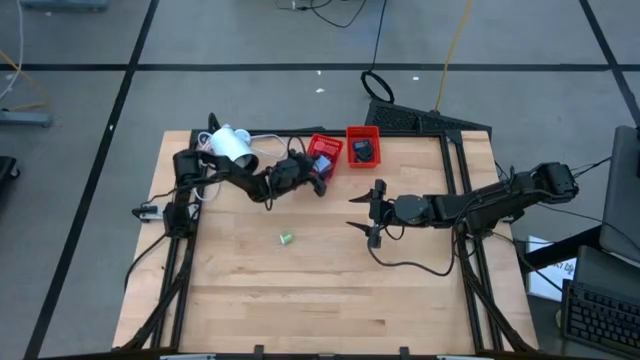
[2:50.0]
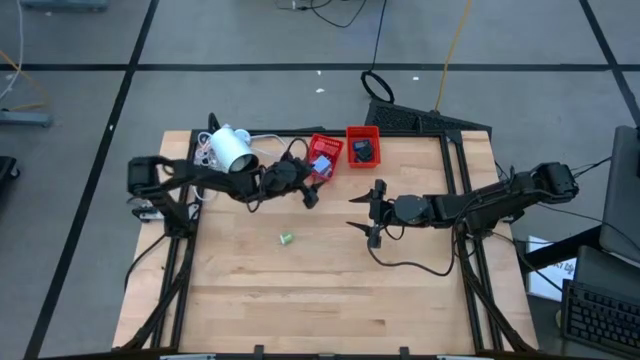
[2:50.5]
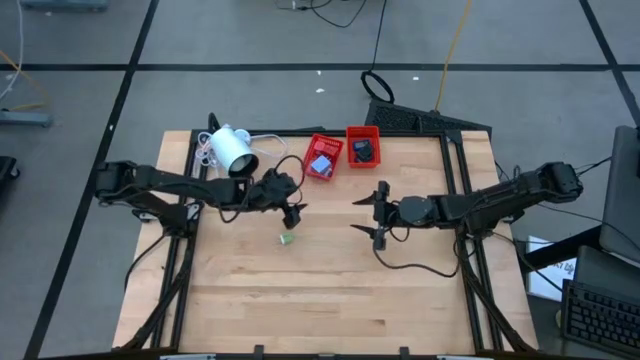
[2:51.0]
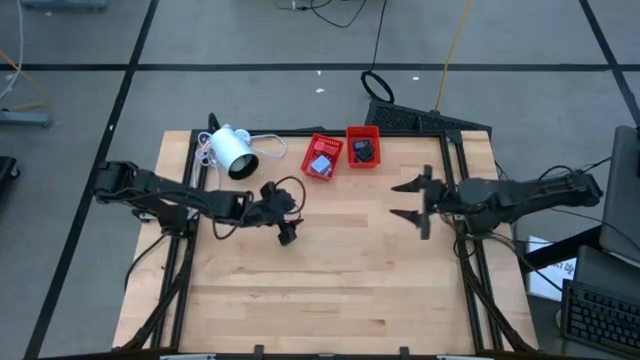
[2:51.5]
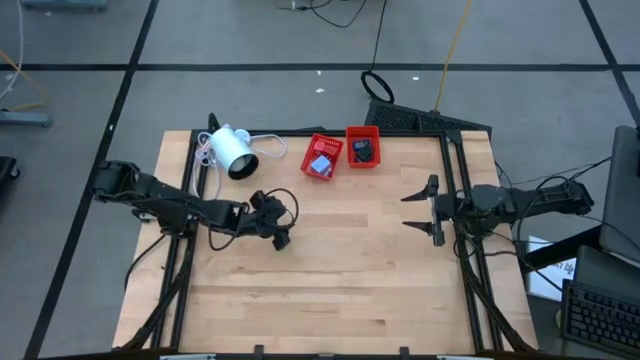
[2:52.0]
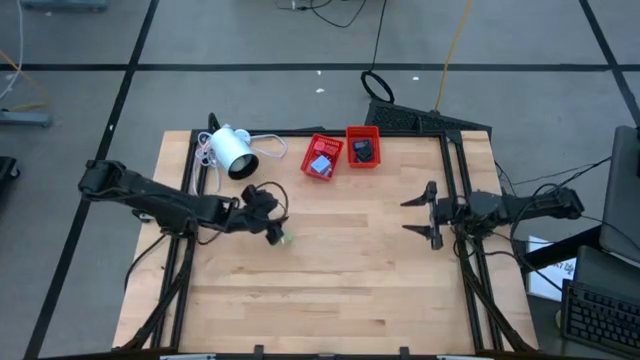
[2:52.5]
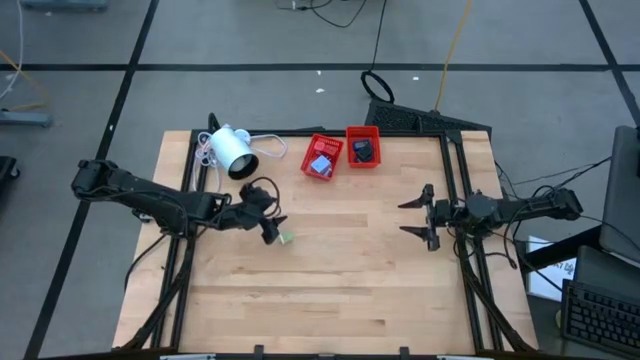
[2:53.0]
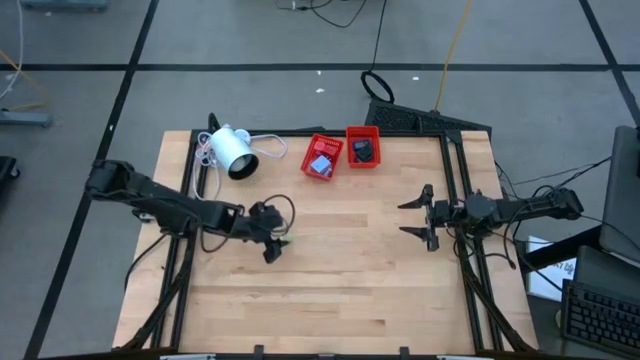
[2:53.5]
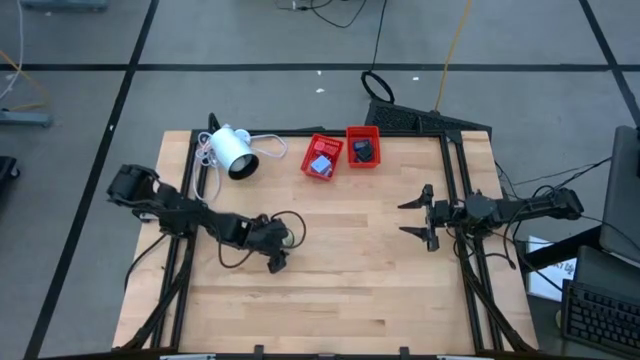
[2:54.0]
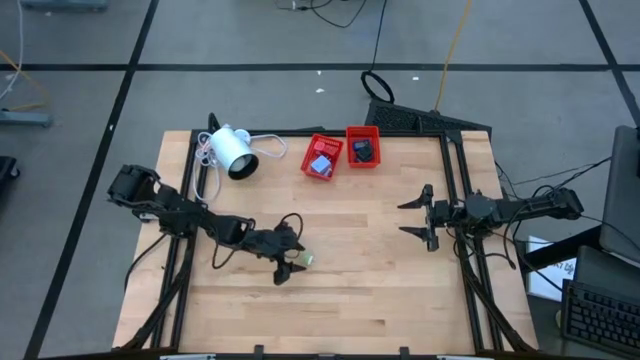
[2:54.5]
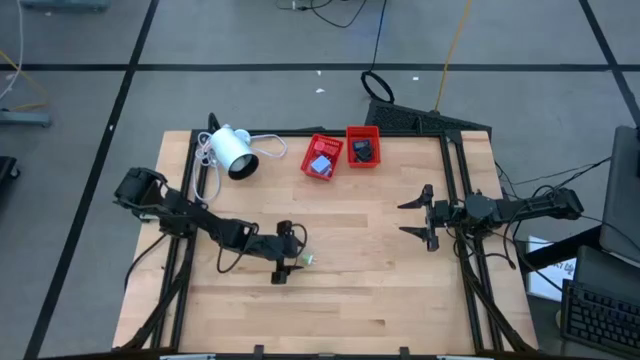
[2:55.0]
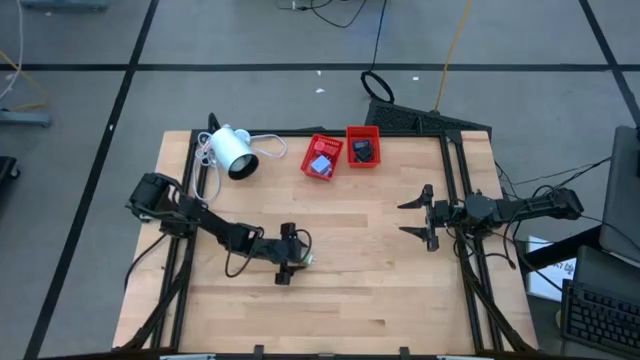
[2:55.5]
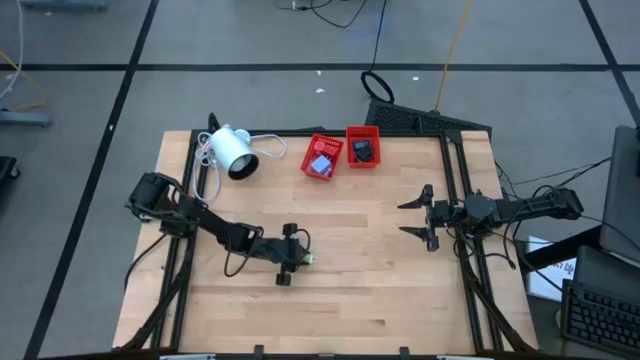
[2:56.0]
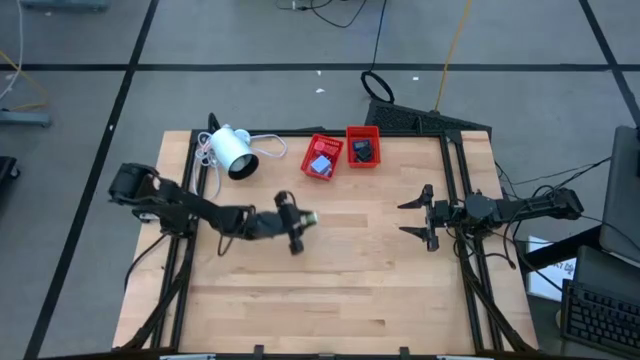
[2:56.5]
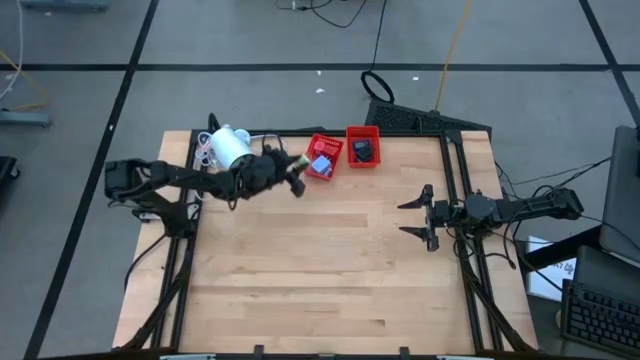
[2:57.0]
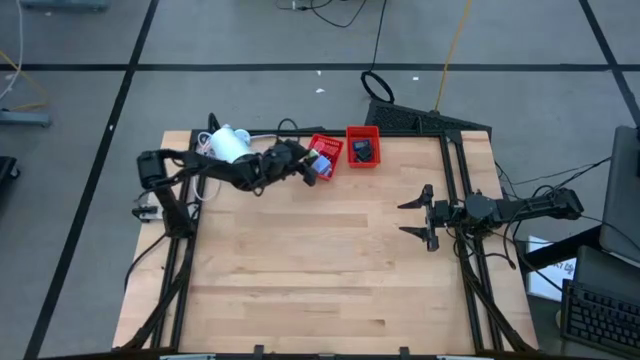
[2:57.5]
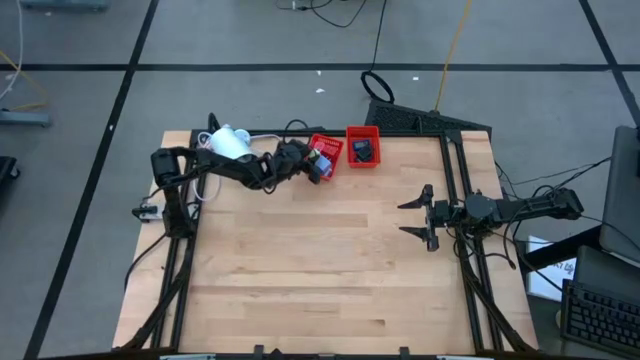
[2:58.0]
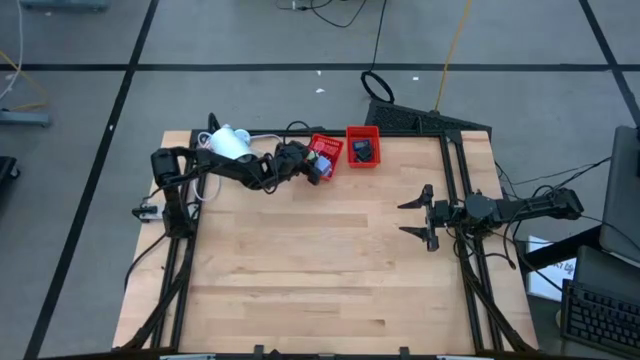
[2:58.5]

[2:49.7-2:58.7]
Task: Pick & Place Office items
Put the green charger adapter into the left red bin

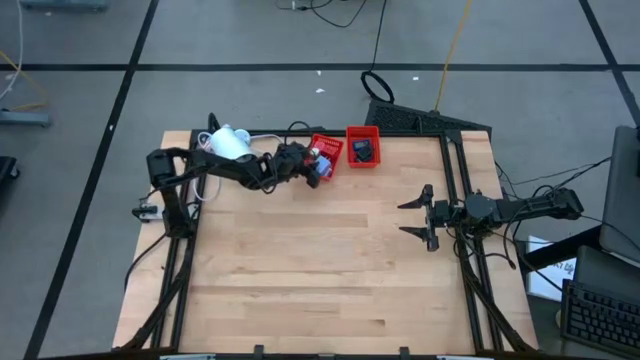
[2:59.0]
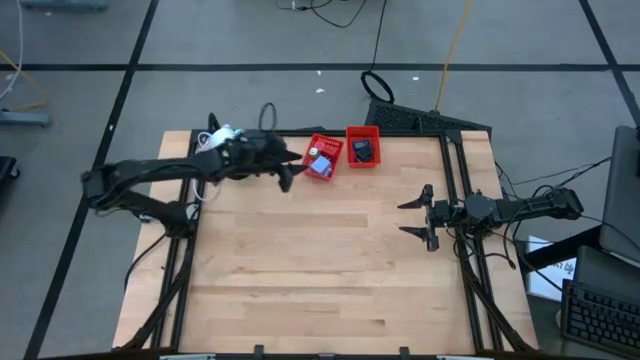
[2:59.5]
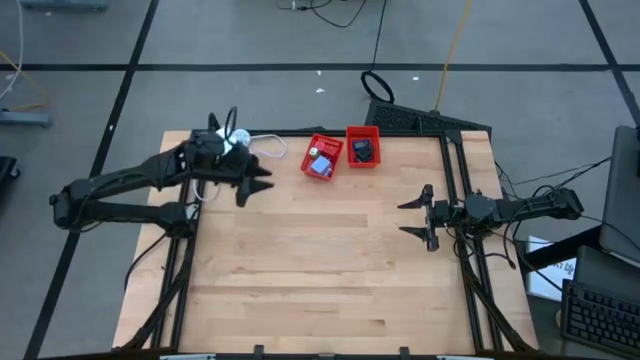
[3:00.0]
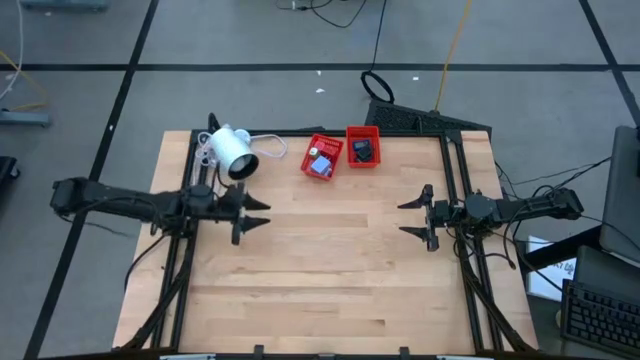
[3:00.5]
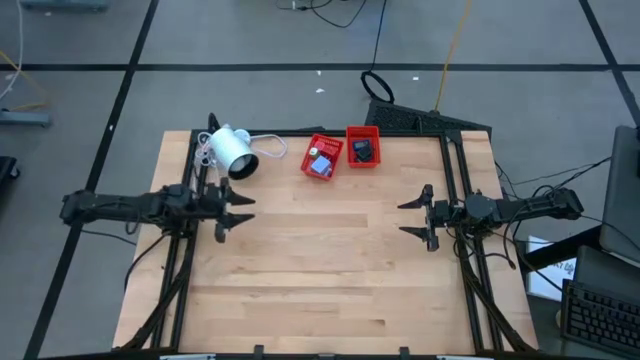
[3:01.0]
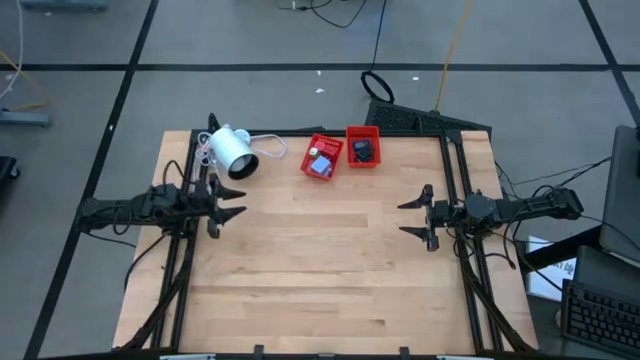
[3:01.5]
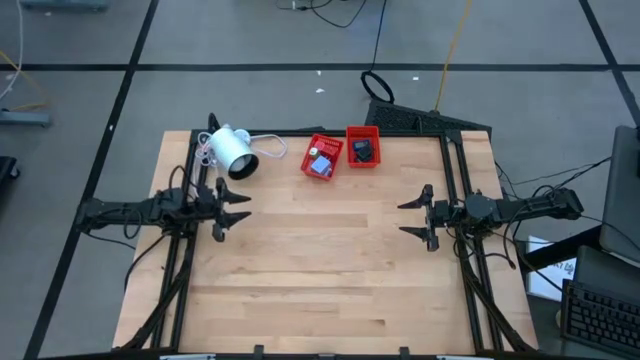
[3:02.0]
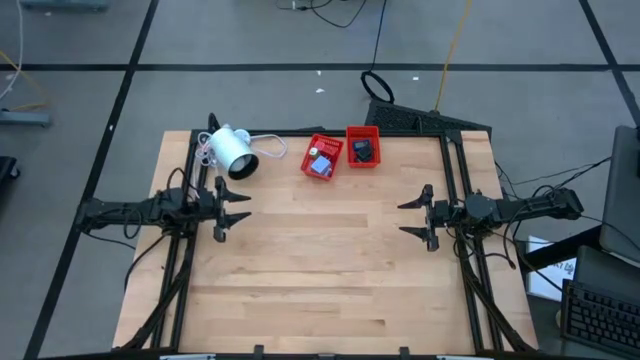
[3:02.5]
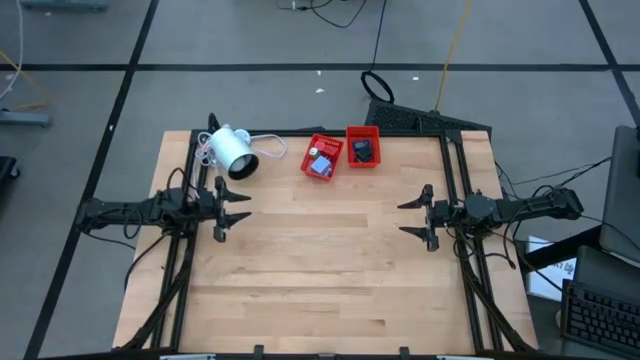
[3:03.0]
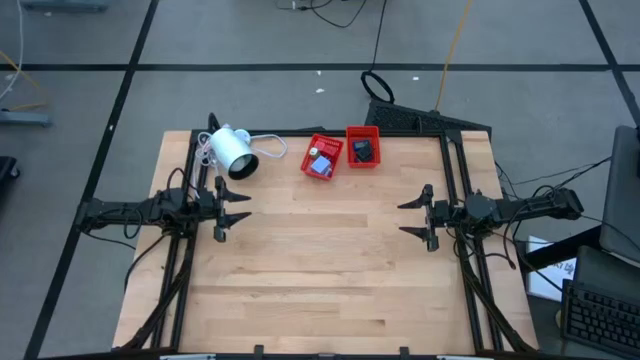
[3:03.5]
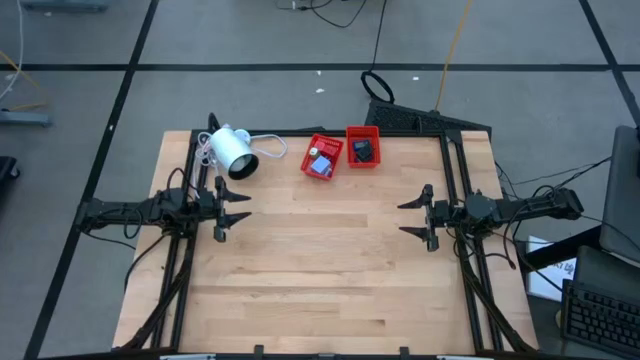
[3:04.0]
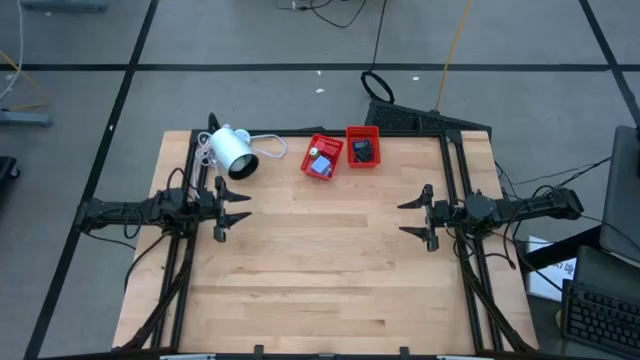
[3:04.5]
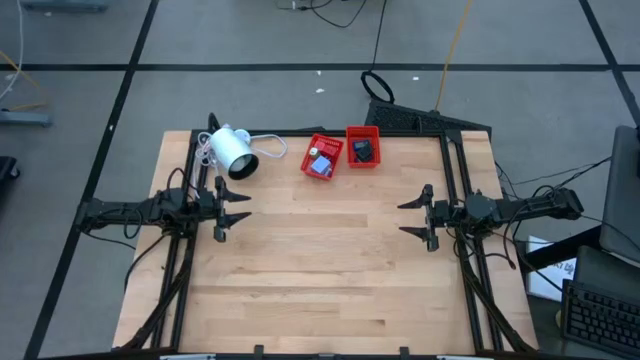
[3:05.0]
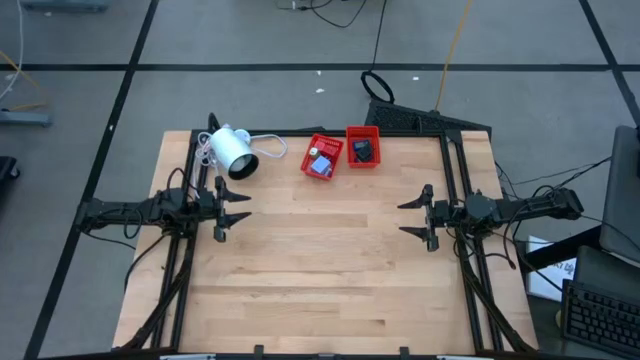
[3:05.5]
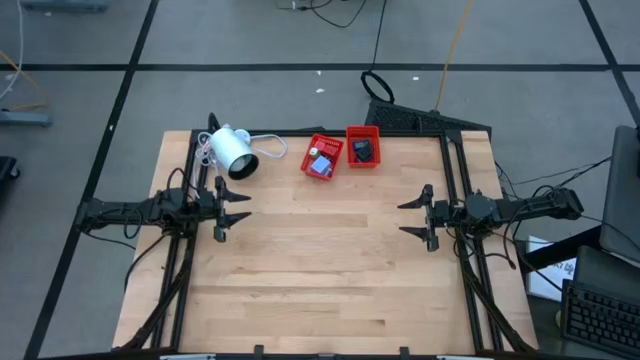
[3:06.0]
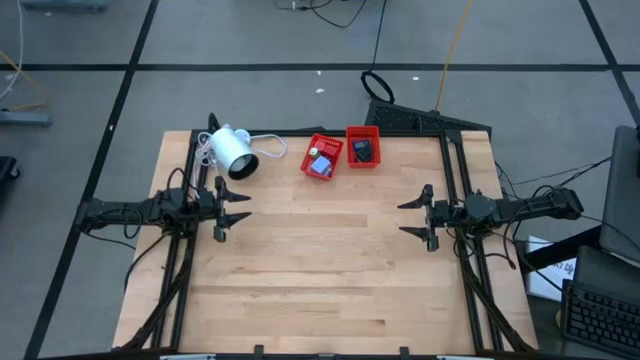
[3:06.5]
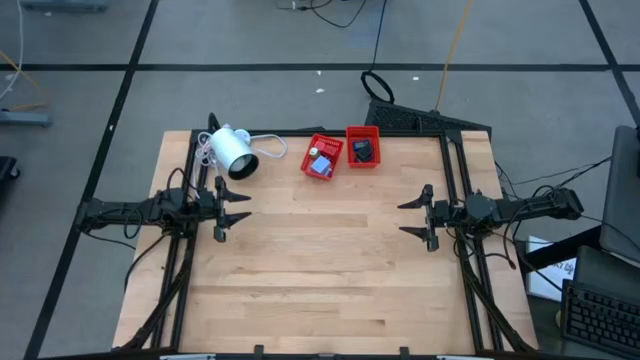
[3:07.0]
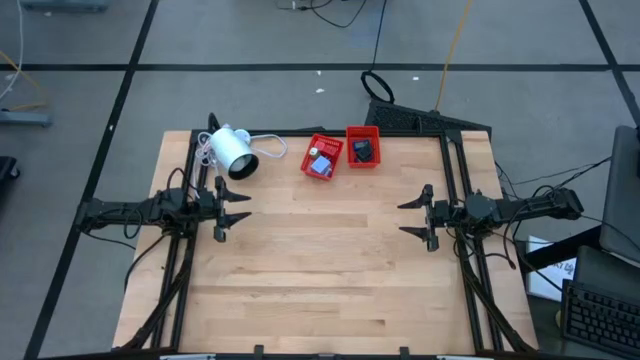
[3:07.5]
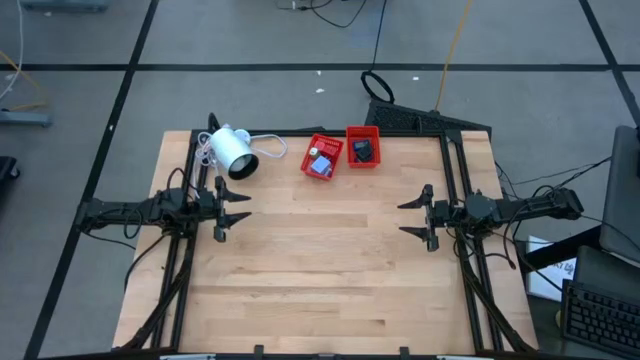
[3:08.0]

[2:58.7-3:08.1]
Return to Home Position

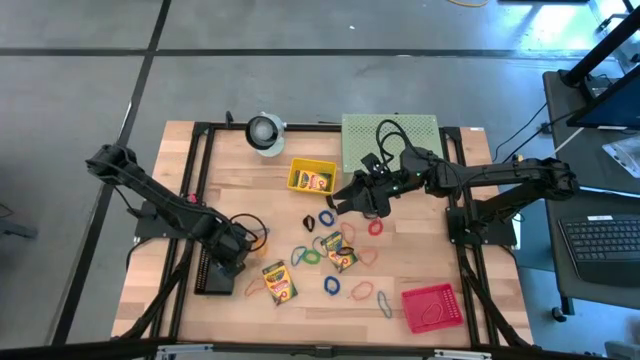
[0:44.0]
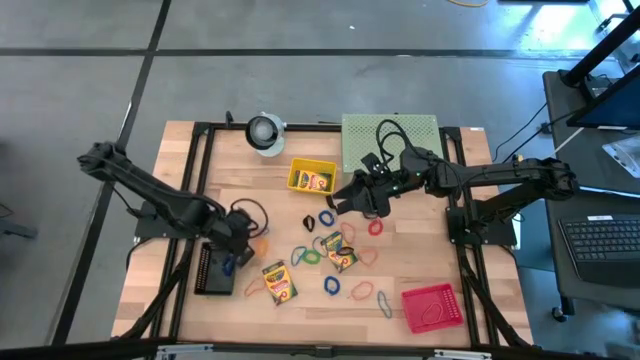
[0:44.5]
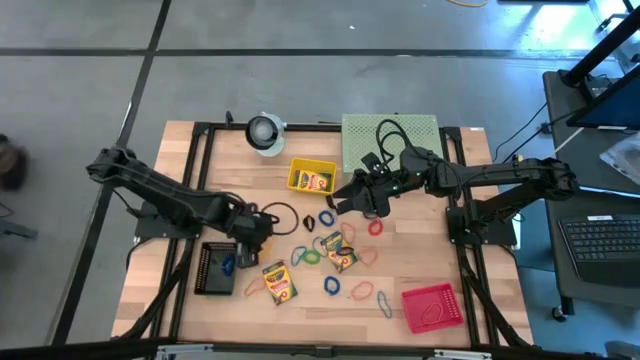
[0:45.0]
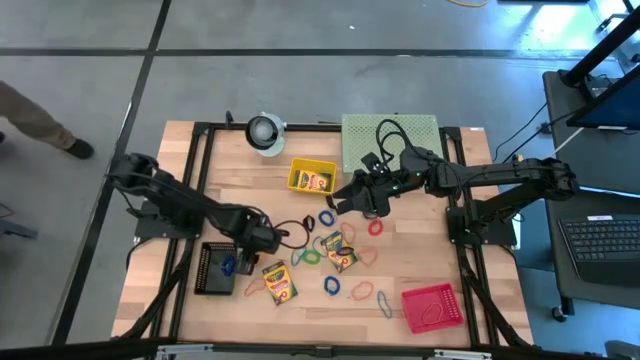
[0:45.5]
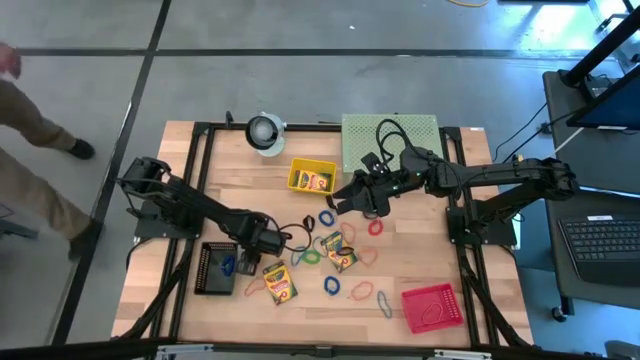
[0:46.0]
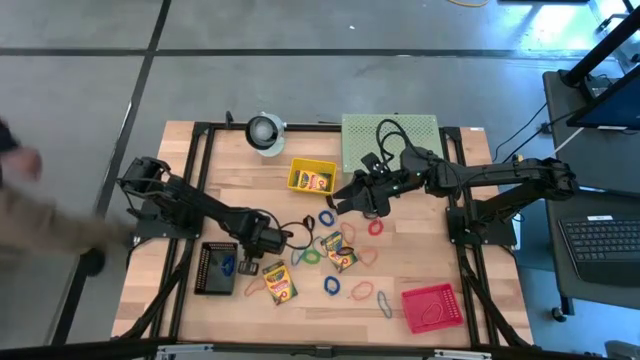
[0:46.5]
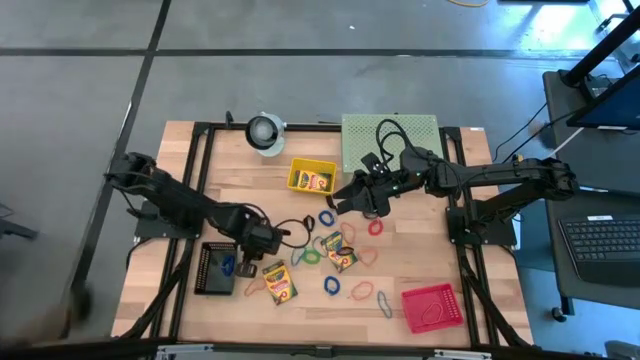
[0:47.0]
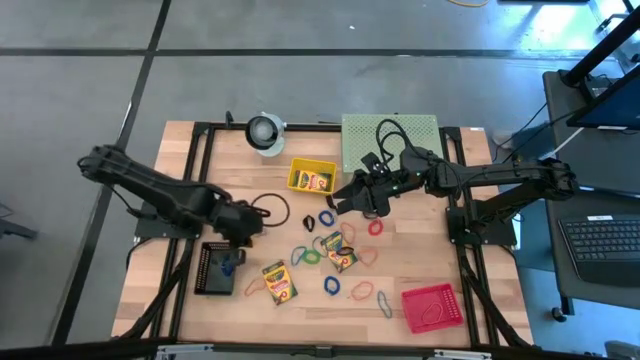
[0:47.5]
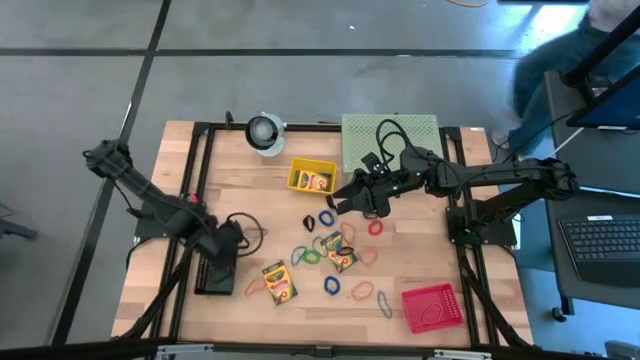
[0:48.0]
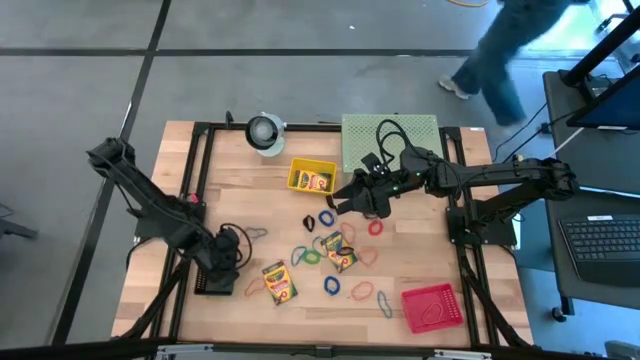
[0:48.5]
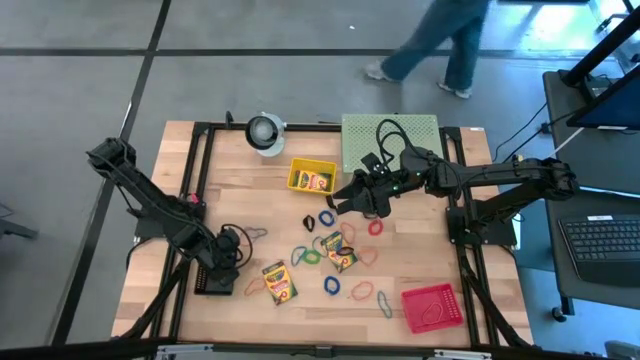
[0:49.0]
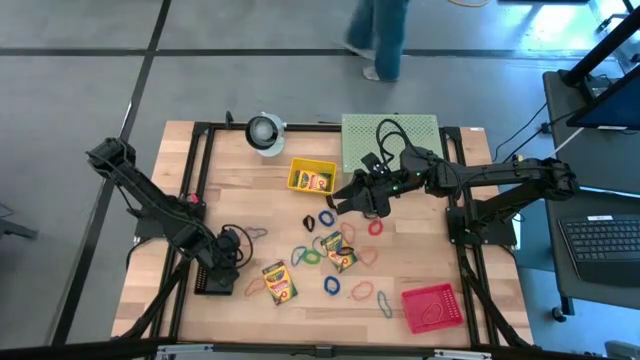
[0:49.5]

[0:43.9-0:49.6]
Task: Pick & Place Office Desk Supplies
Put the yellow spring keychain into the black bin
